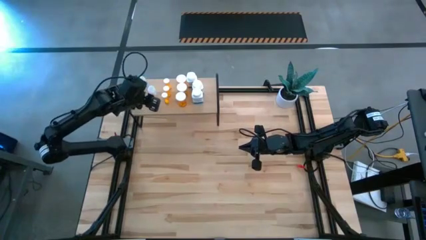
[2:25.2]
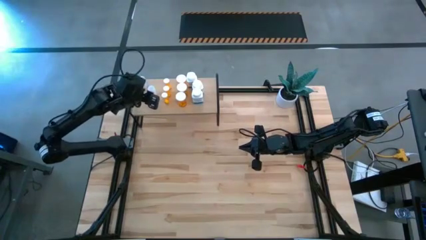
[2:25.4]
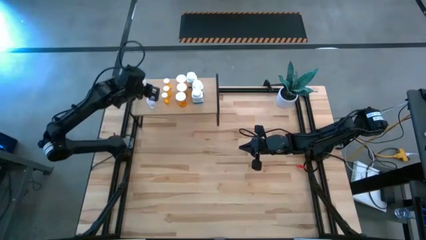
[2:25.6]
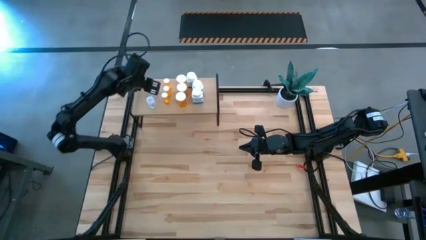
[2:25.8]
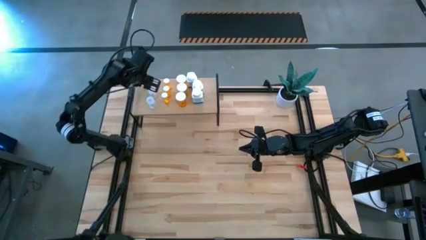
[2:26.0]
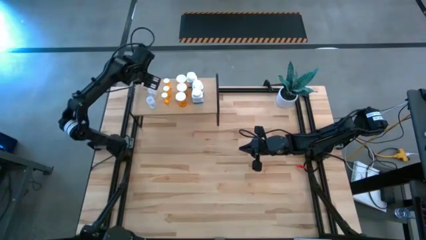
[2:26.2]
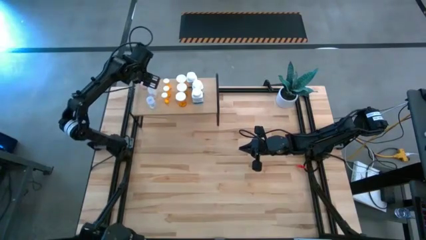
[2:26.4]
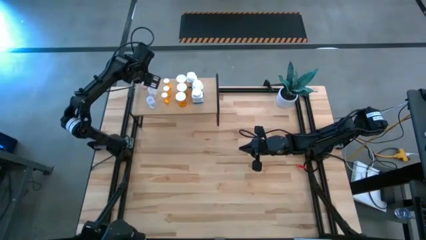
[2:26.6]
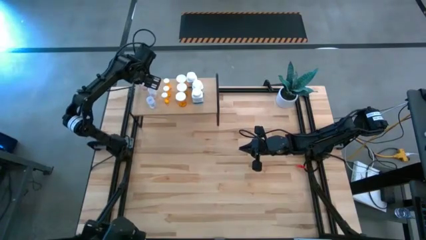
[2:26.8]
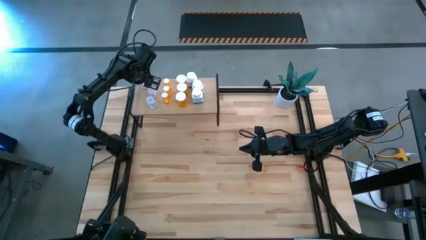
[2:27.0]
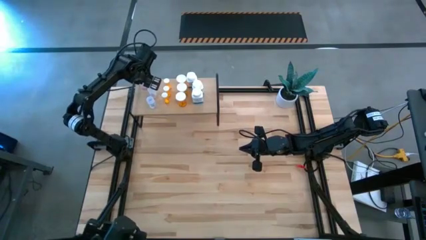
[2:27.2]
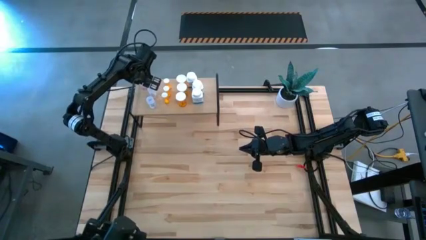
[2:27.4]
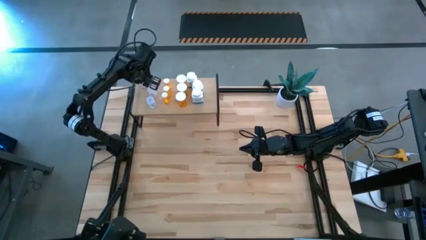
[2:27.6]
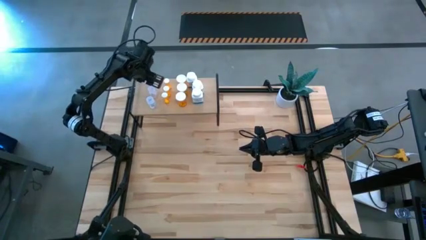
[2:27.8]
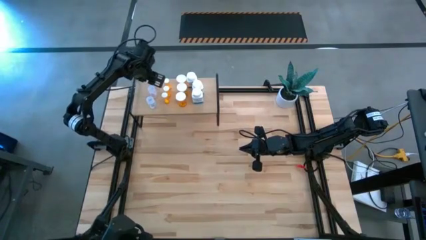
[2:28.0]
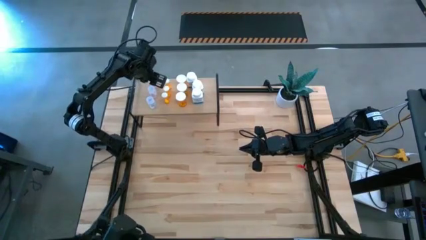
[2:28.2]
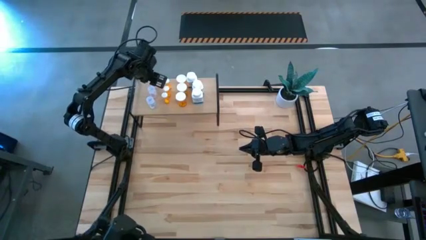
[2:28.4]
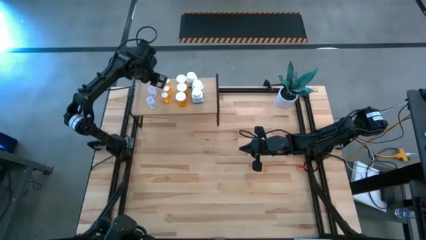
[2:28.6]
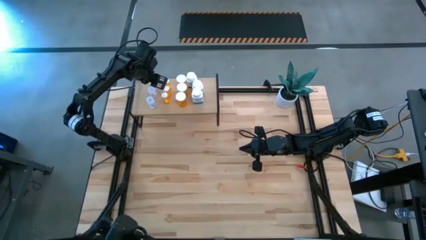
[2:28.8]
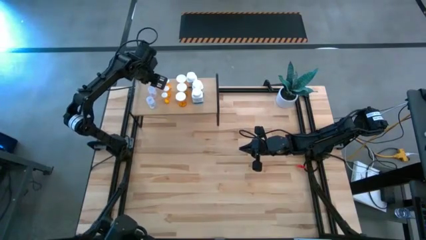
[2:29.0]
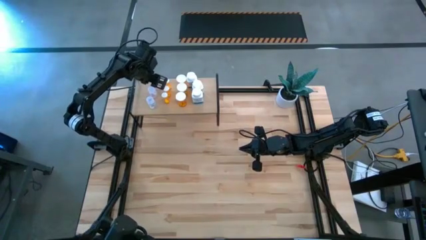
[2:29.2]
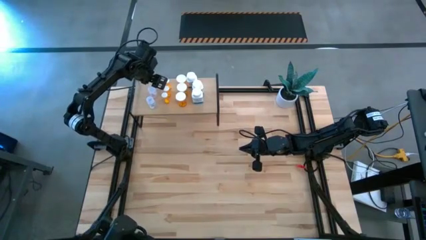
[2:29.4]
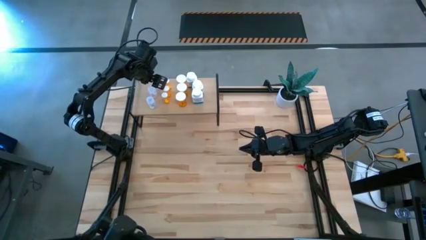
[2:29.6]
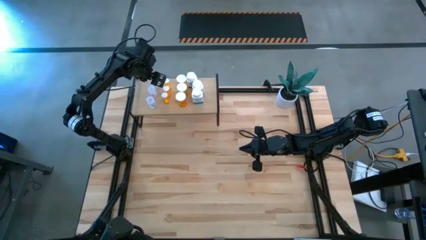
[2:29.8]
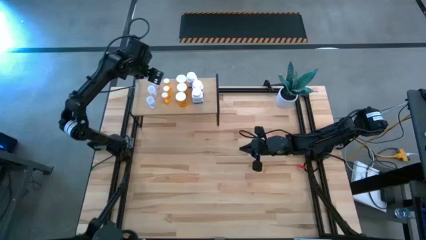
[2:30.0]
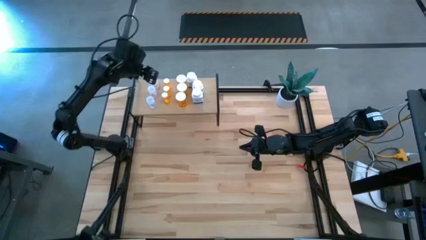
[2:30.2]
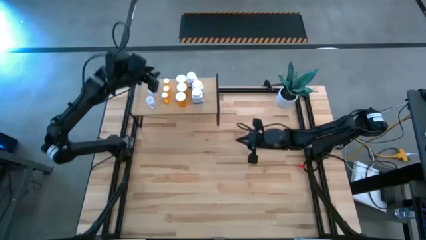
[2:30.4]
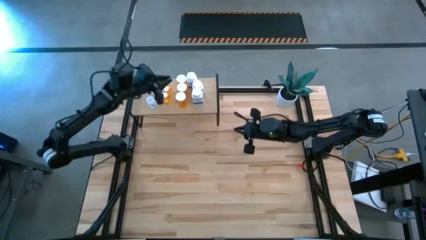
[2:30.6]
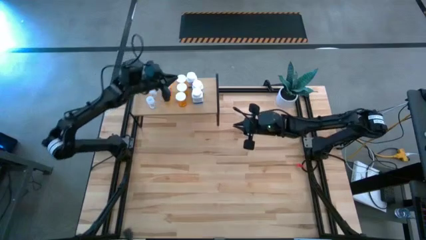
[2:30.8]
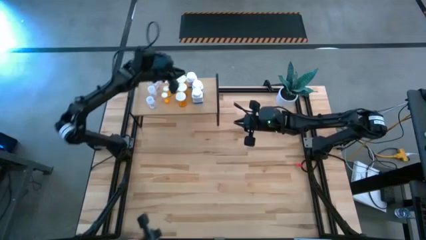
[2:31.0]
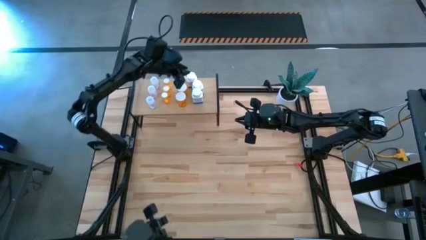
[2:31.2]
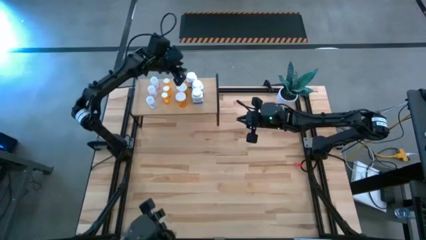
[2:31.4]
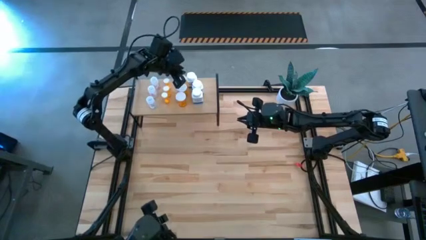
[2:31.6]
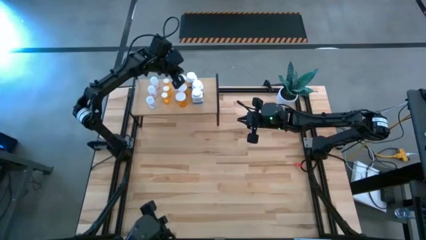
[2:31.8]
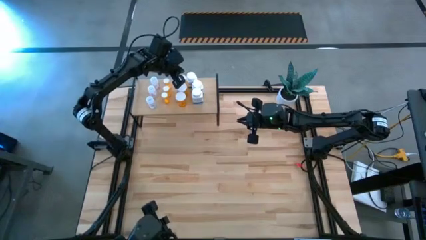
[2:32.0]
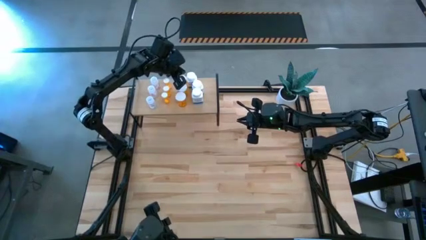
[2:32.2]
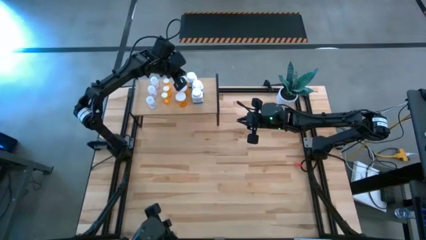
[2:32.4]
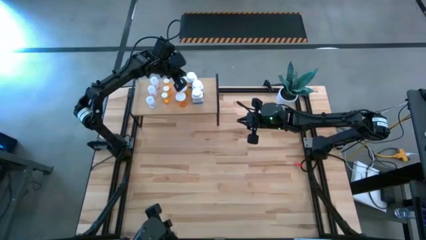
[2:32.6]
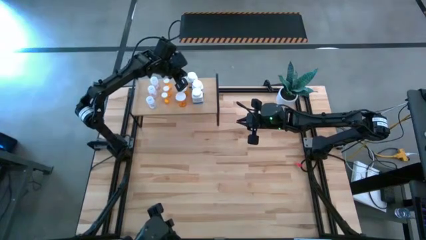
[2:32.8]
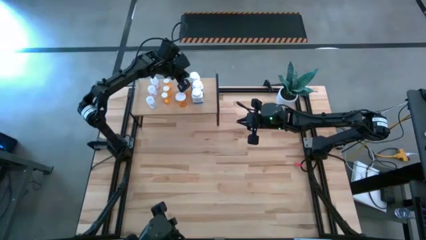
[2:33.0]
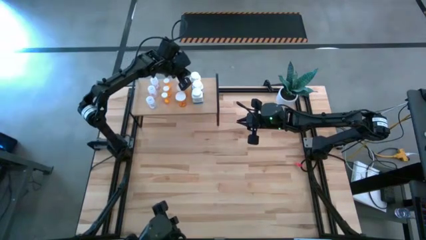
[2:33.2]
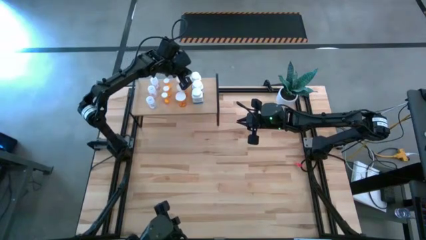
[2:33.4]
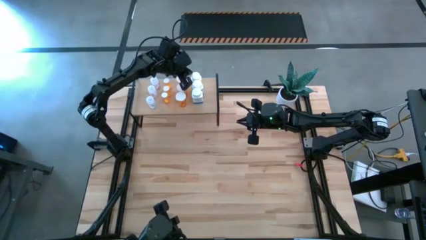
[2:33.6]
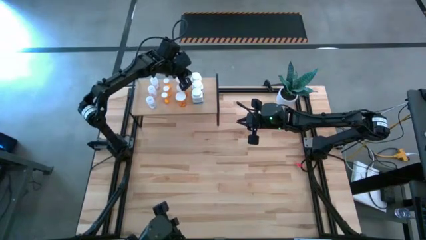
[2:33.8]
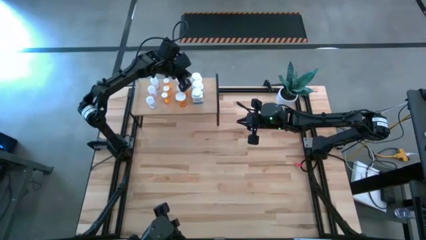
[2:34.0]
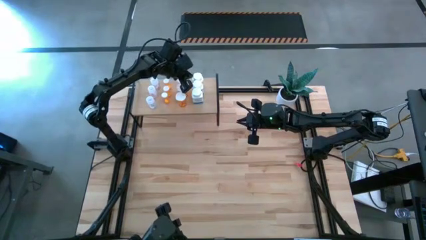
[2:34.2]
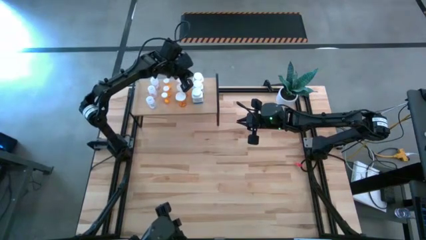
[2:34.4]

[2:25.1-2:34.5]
Task: Pick and place medicine bottles onto shelf by color
Adjust the pill bottles on the shelf

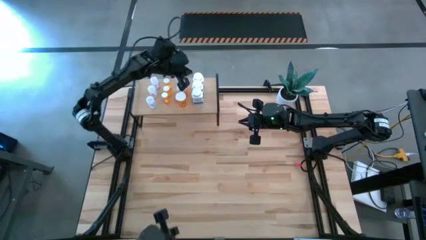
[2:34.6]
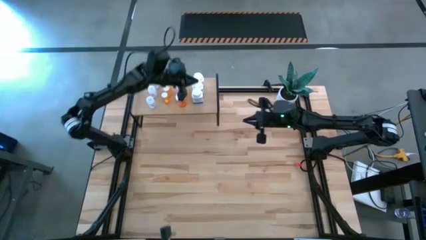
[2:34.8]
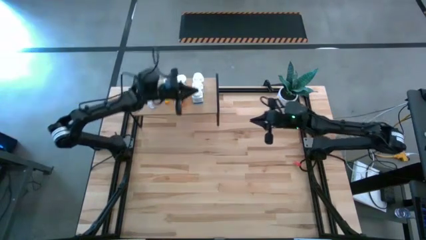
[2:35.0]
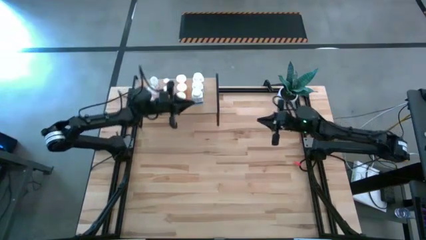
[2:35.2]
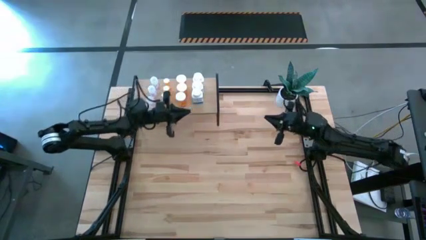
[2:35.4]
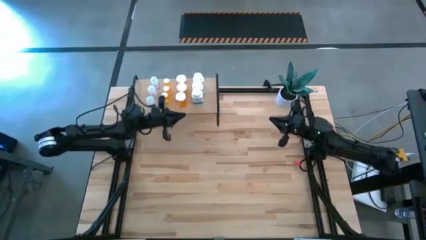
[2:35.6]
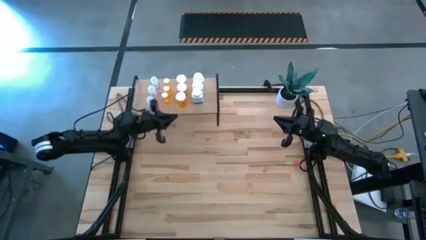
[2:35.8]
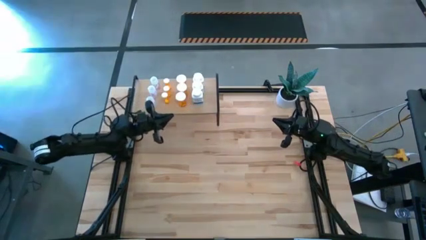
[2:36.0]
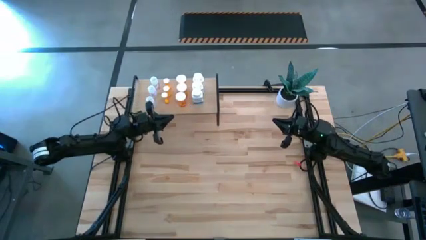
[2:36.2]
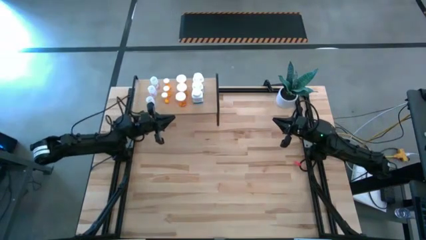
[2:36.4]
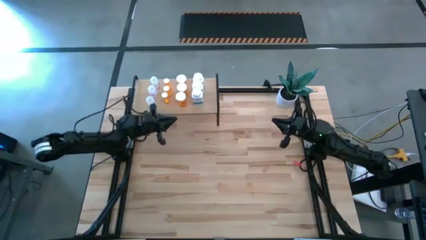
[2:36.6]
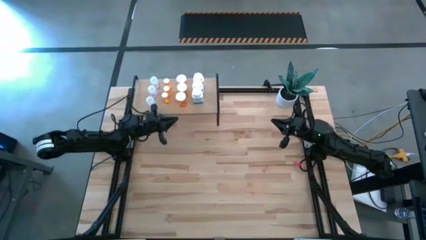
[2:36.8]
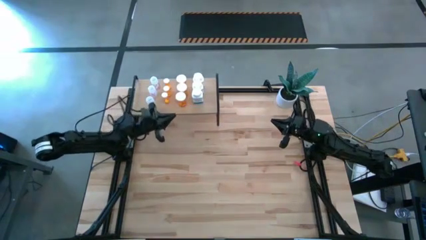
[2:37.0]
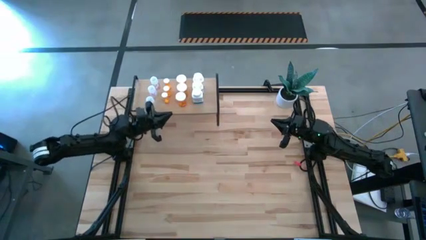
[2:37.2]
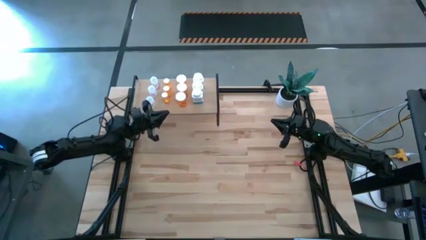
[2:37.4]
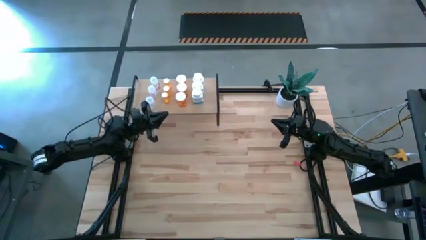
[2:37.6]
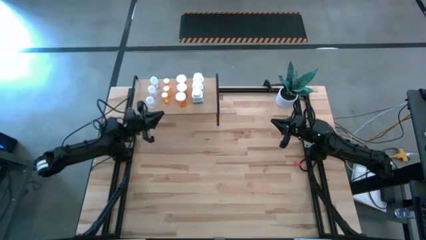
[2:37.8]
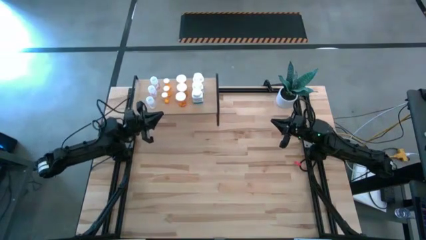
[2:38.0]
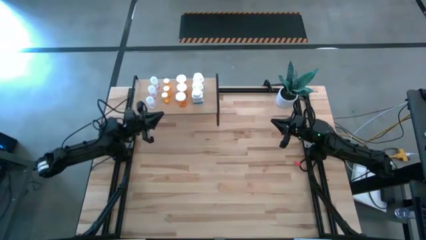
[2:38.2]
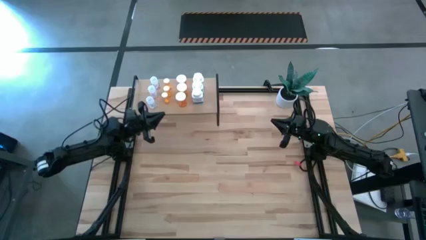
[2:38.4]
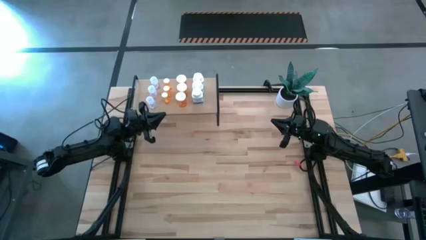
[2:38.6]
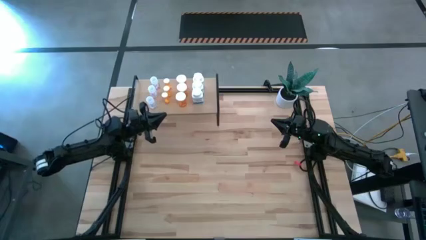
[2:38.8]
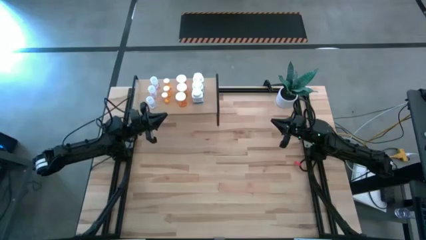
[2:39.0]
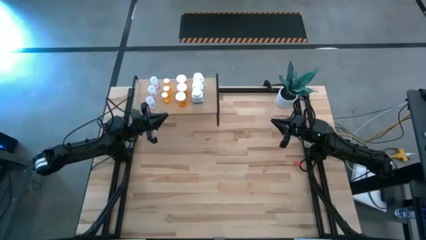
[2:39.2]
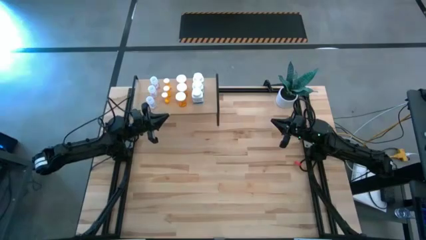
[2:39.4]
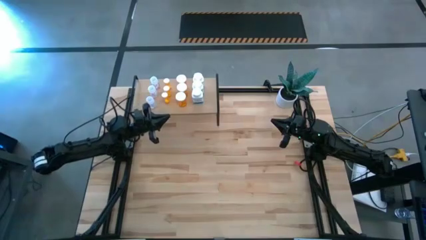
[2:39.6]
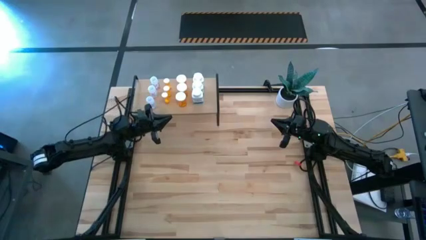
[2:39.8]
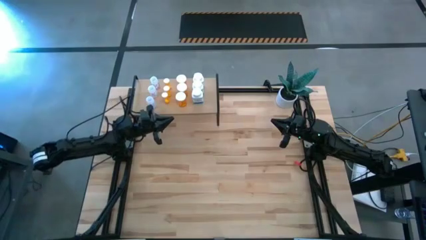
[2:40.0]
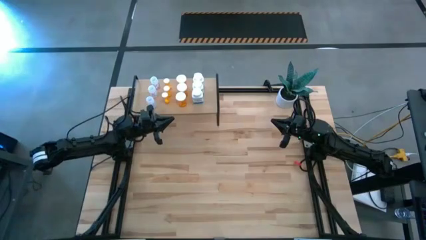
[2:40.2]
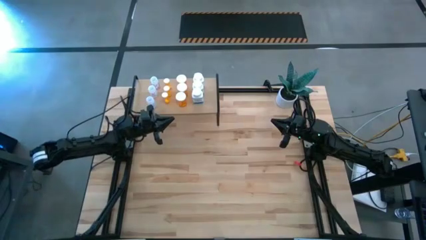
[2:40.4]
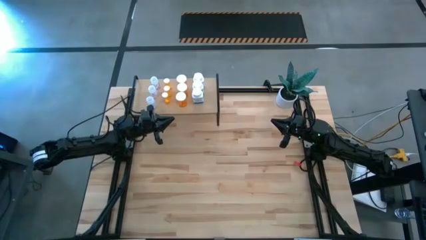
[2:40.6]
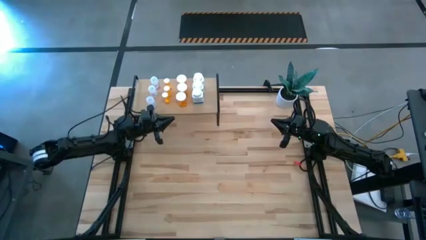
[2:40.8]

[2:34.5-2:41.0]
Return to Home Position
